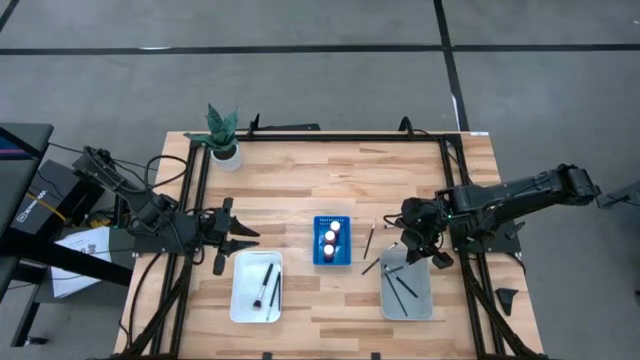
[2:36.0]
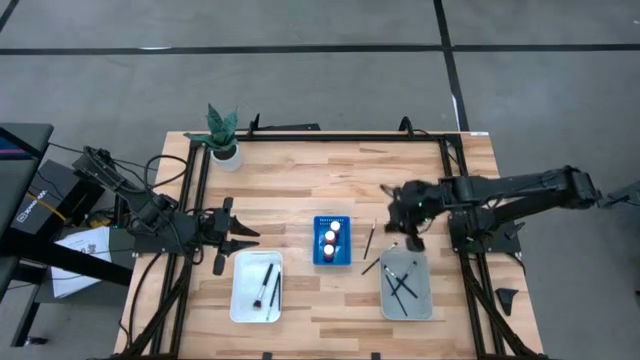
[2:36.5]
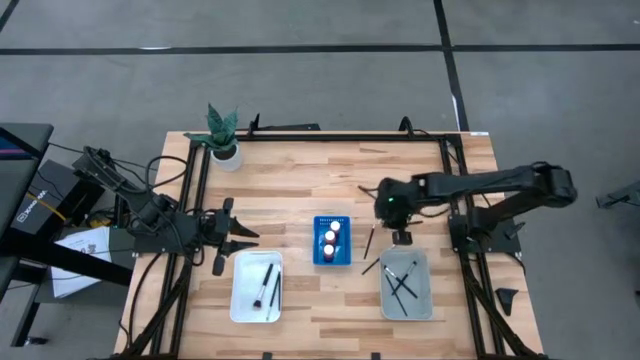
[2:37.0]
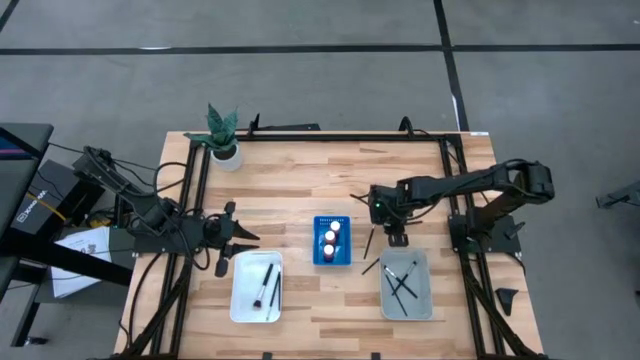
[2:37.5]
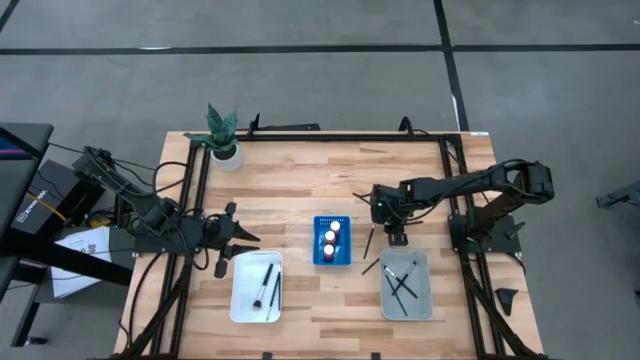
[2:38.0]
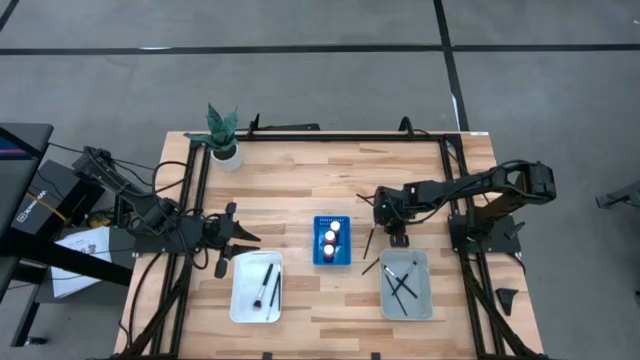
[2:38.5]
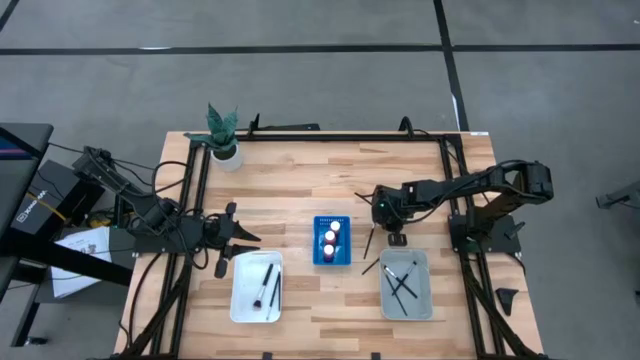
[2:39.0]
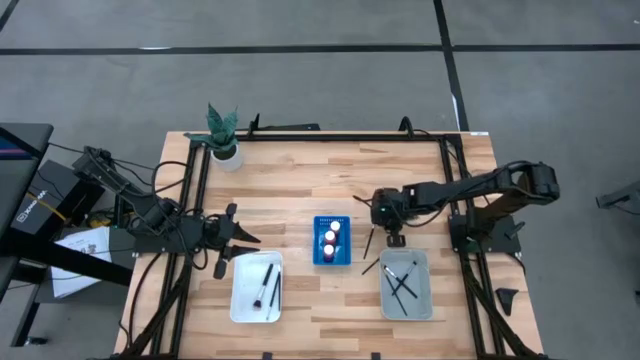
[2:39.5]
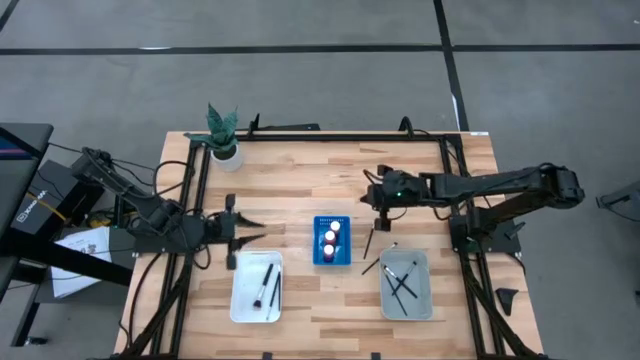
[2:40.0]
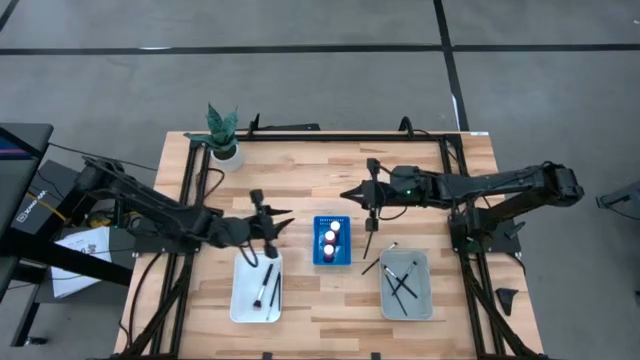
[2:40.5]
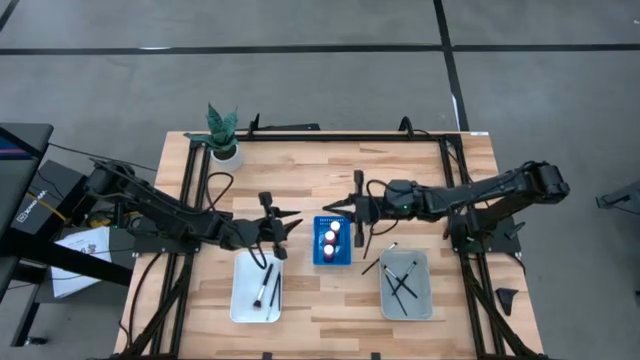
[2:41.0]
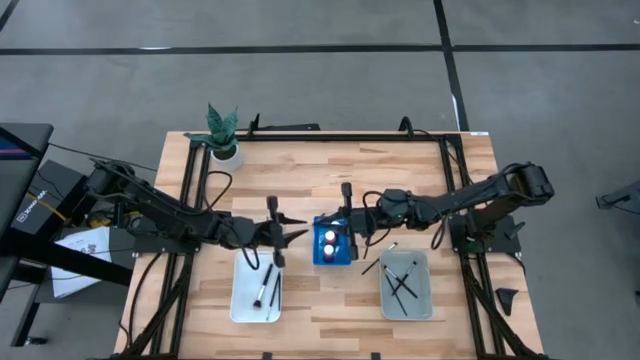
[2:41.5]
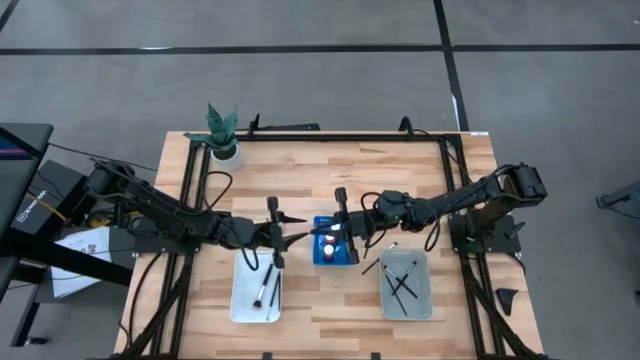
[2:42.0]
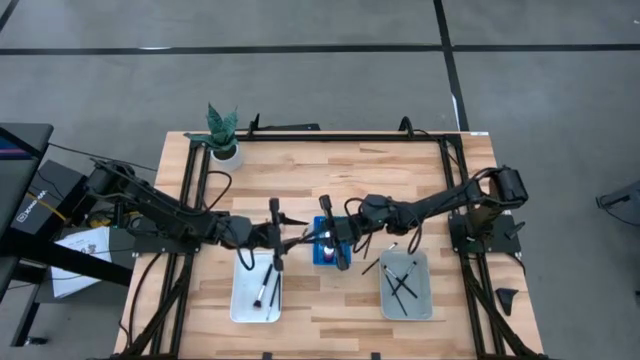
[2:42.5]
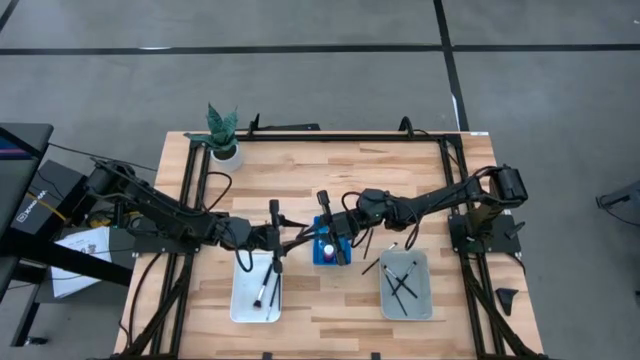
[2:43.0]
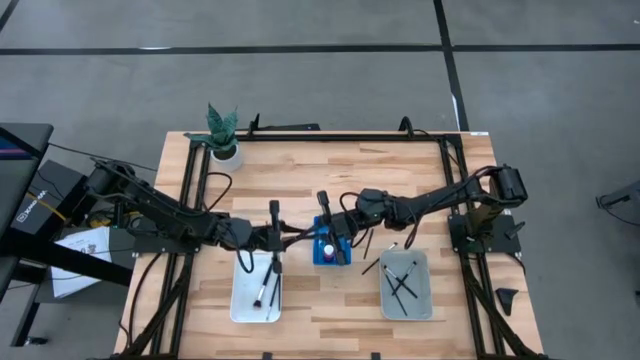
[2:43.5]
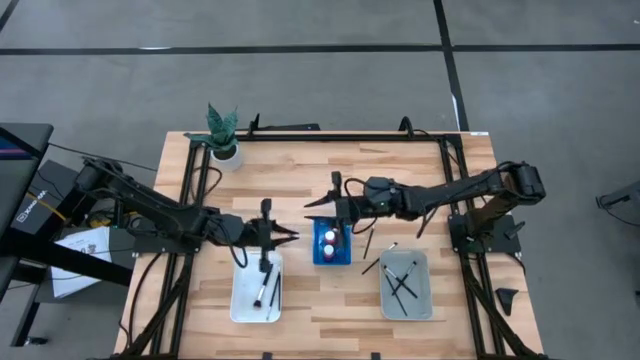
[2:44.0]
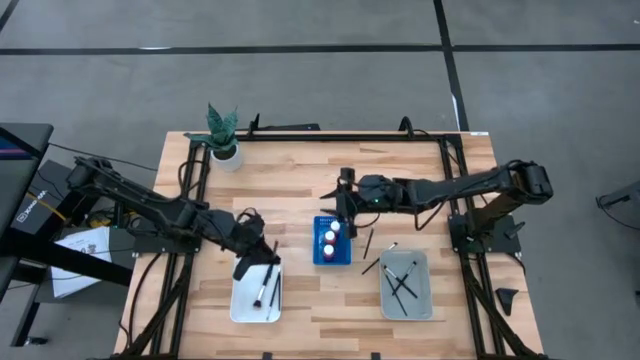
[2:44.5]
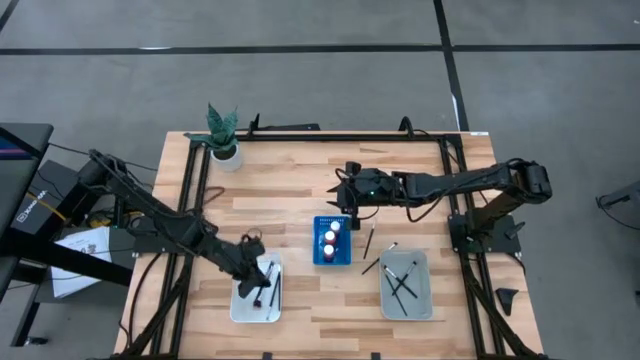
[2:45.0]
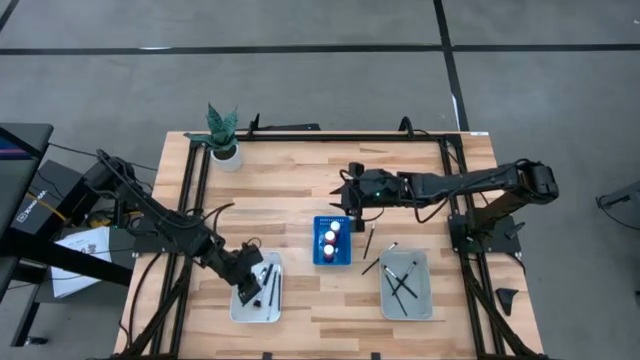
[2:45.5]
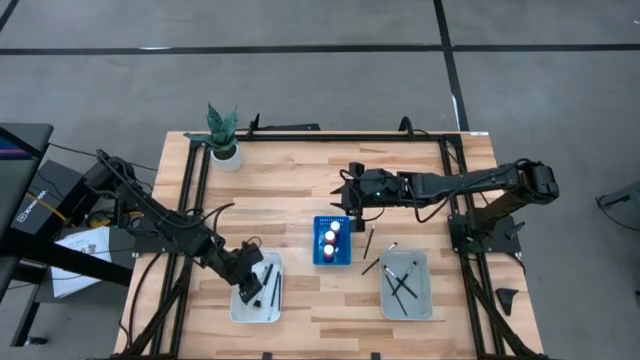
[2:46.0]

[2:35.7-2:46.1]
Task: Pick & Place Paint Supplies
Put the top eyeshadow brush into the white bin

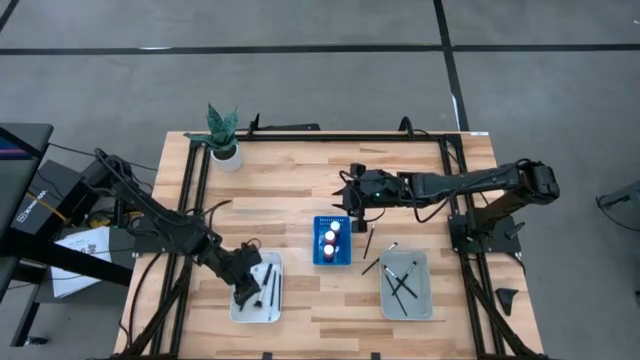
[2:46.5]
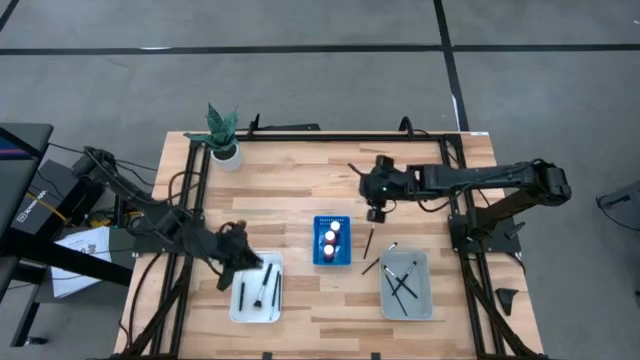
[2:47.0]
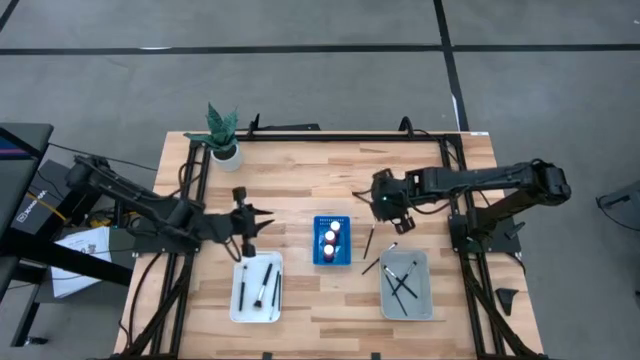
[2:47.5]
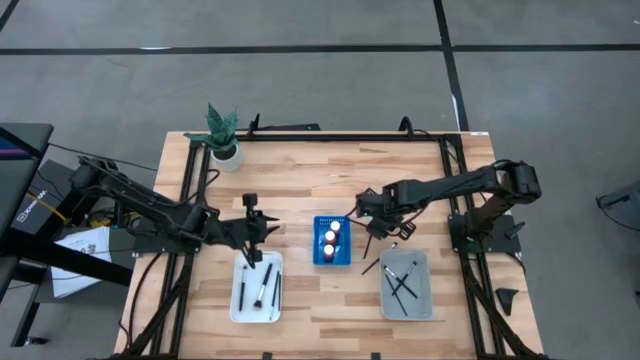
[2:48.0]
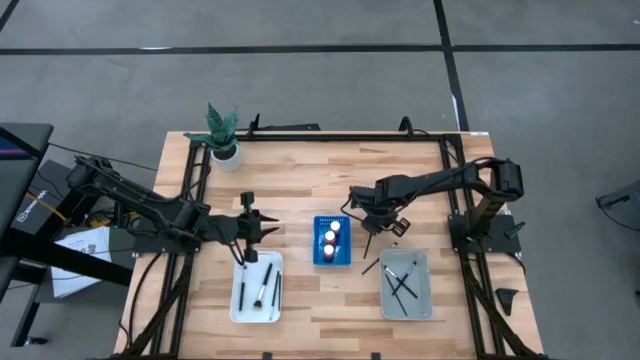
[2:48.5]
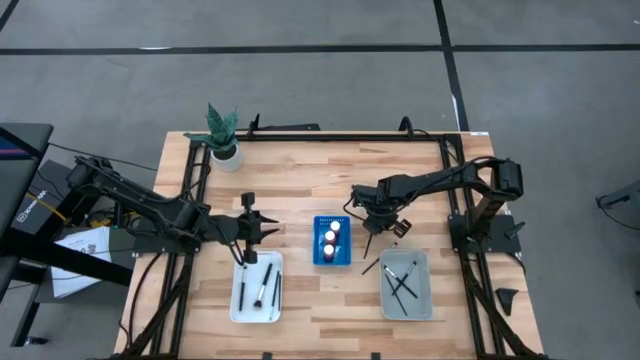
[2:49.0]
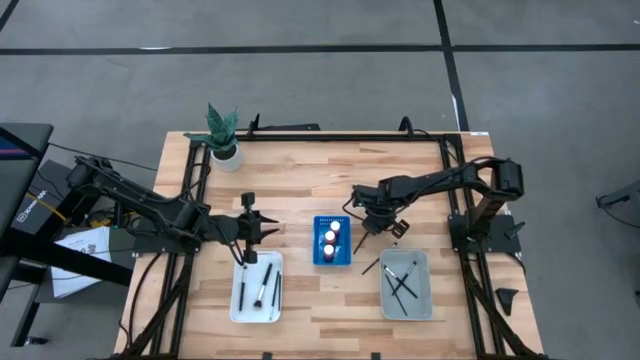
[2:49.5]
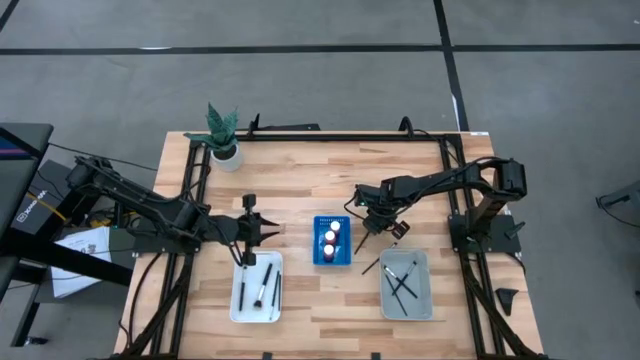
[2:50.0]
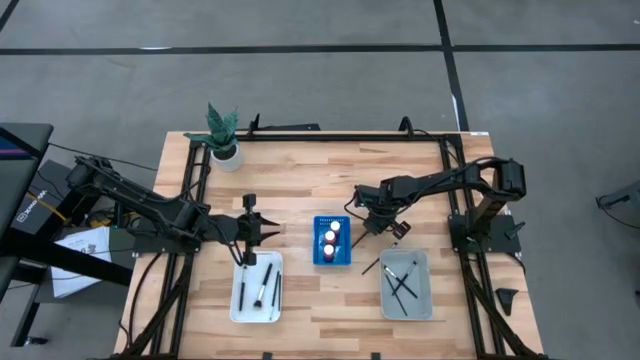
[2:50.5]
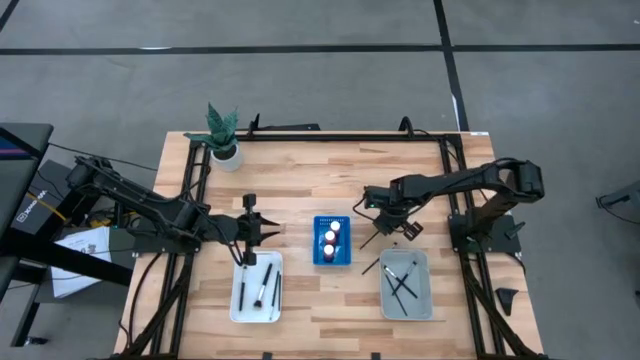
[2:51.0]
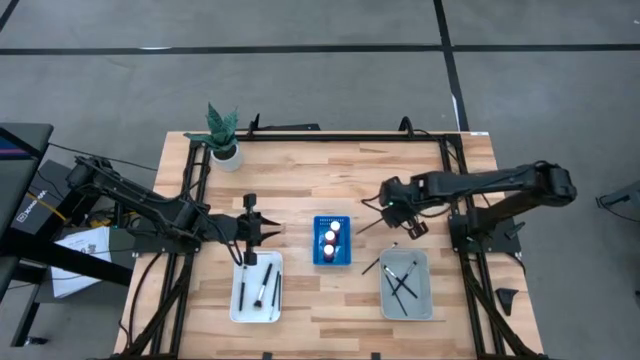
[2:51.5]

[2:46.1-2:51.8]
Put the liner brush into the gray bin

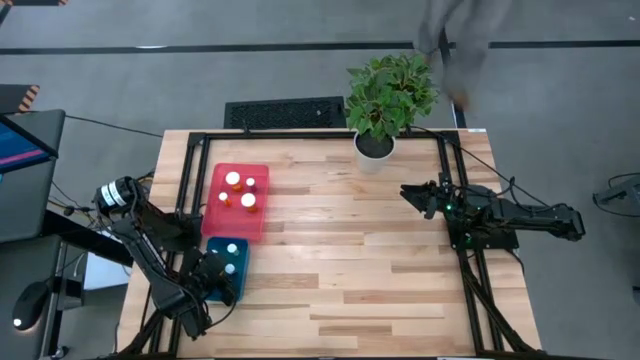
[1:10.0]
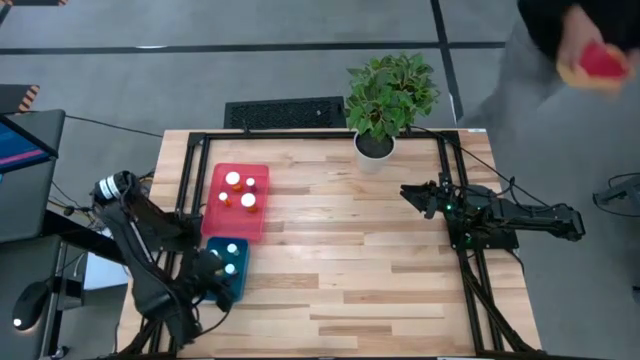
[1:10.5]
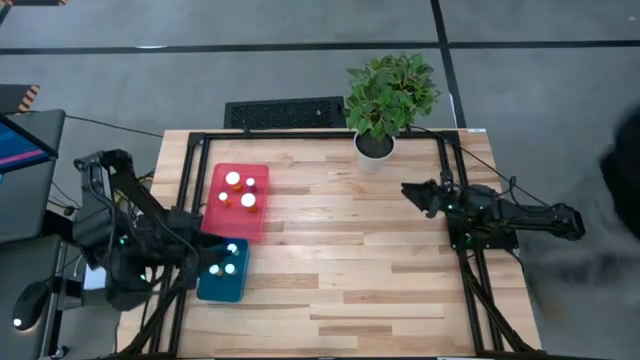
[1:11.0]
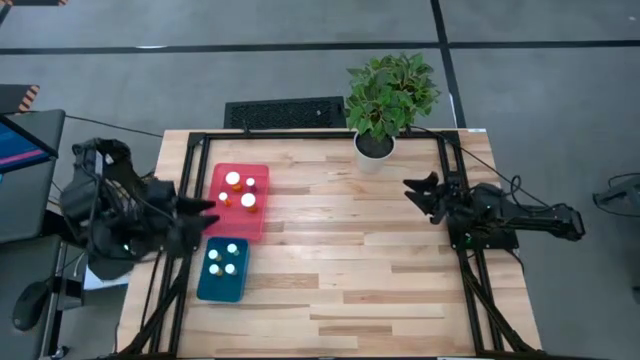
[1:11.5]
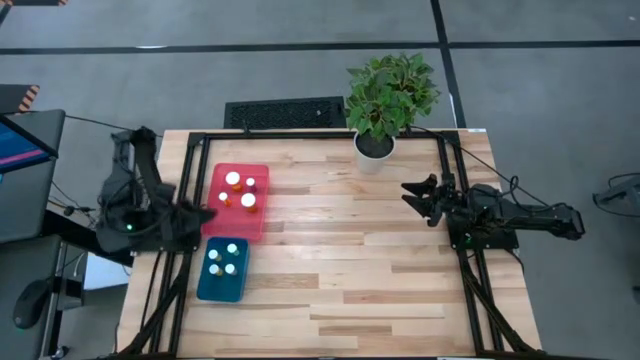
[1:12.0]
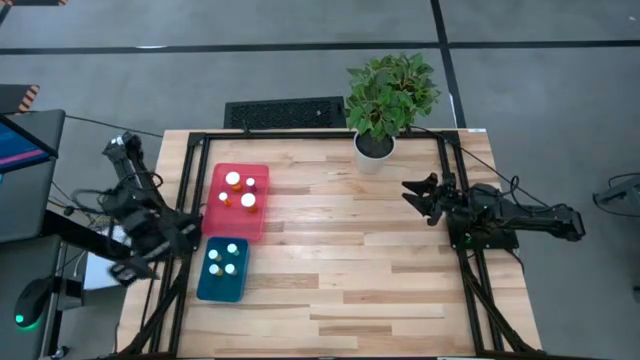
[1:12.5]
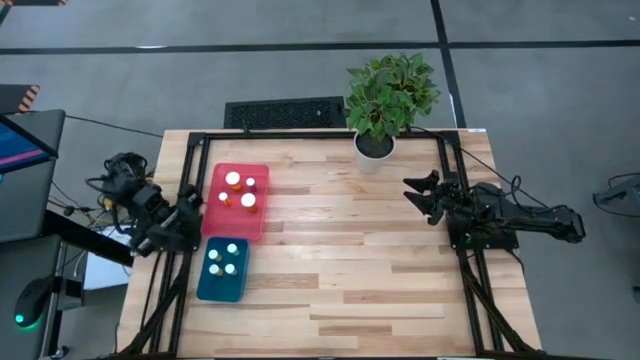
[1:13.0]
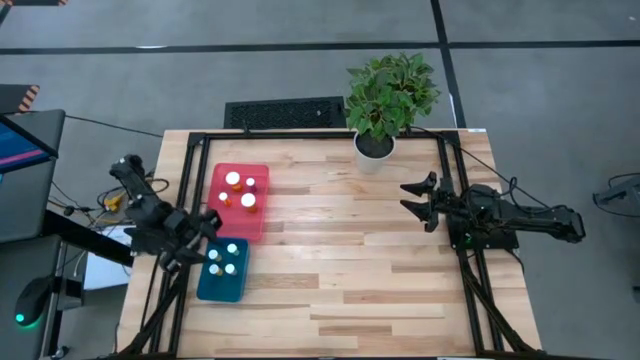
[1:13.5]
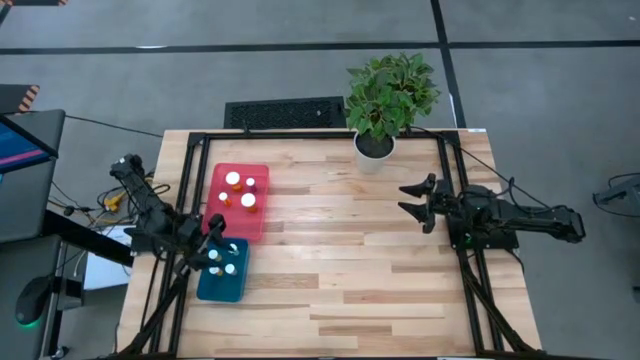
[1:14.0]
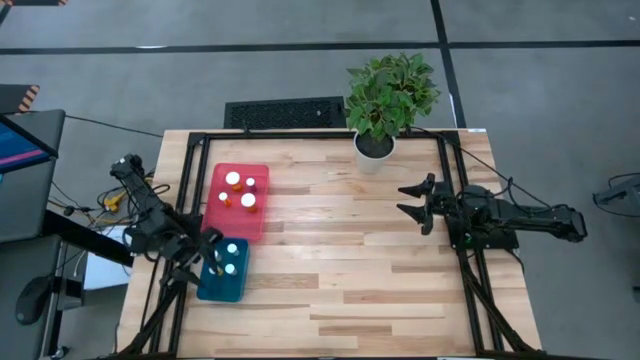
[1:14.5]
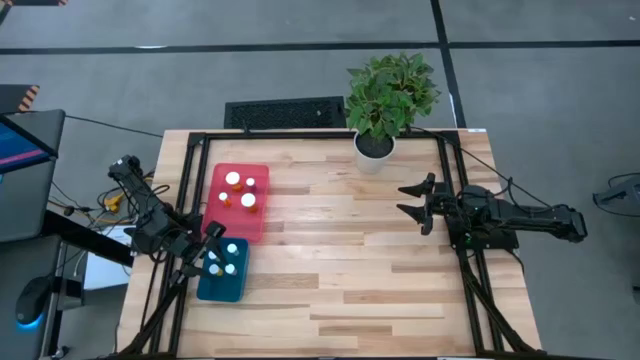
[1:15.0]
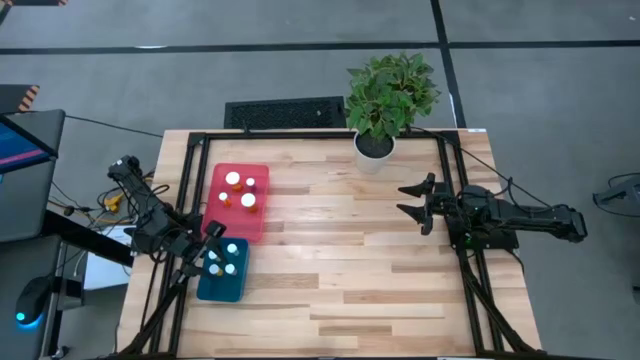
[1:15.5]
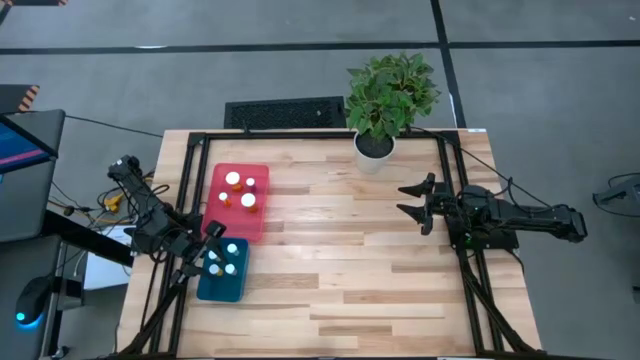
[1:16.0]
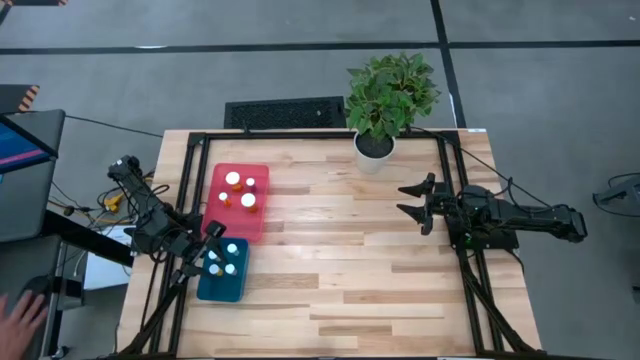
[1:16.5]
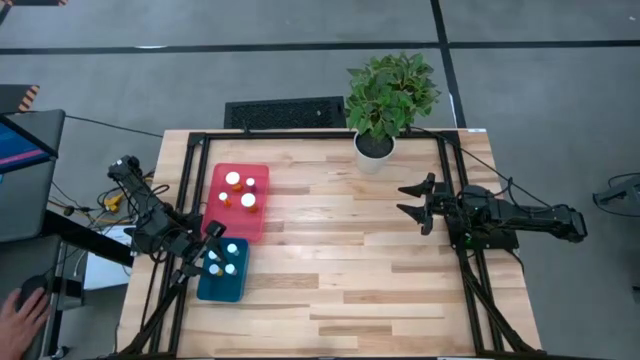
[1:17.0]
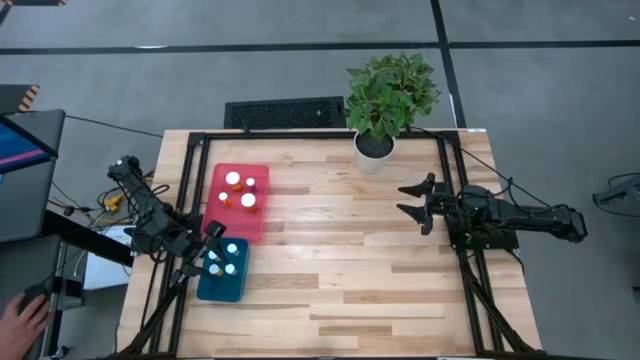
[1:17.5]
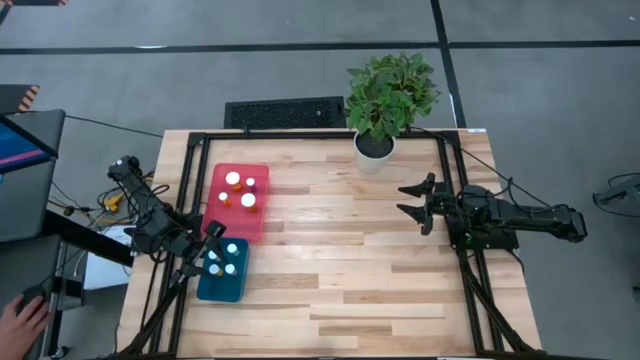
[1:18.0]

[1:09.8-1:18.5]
Task: Pick and place medicine bottles into bin by pill shape (circle, oval)
Return to Home Position
